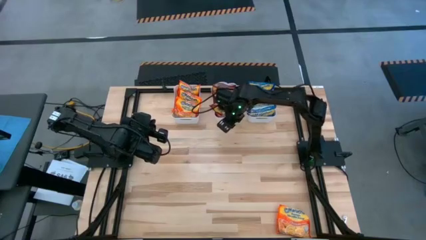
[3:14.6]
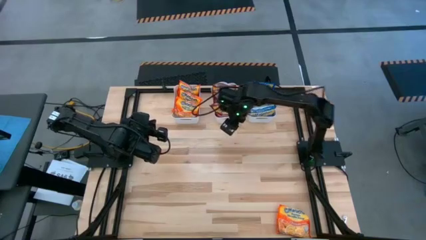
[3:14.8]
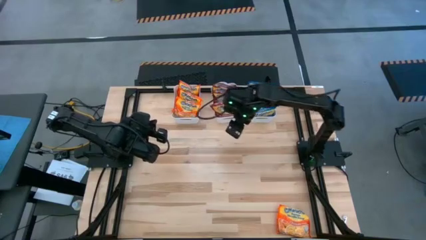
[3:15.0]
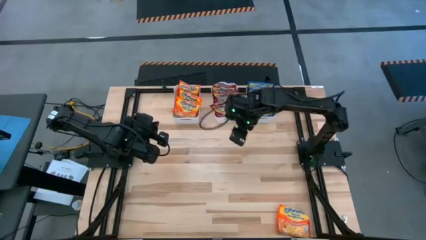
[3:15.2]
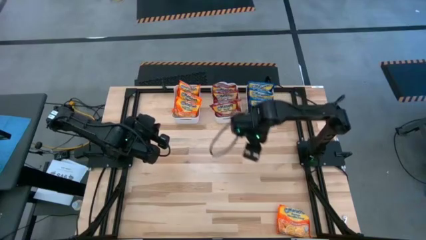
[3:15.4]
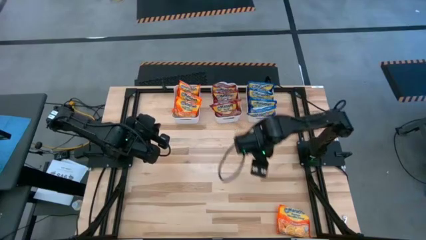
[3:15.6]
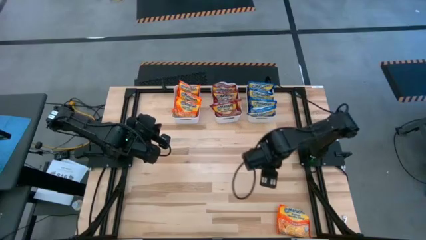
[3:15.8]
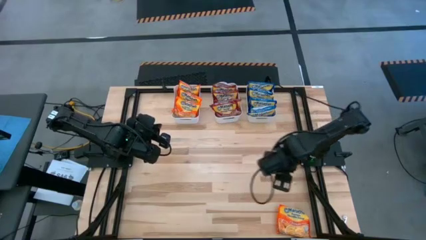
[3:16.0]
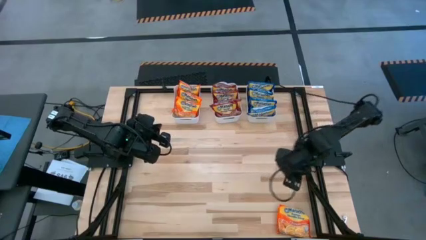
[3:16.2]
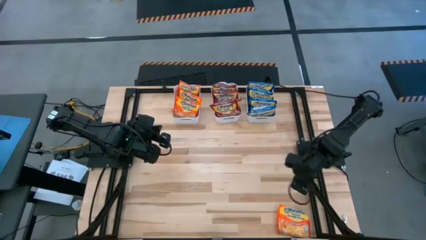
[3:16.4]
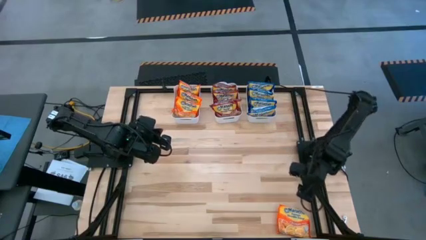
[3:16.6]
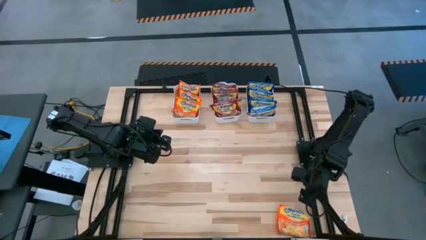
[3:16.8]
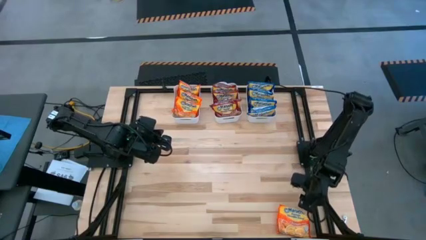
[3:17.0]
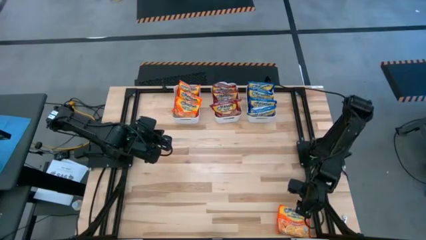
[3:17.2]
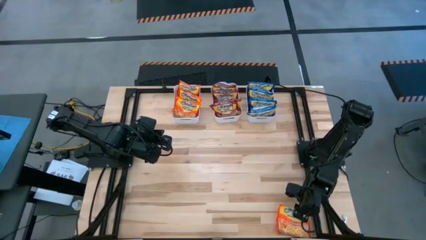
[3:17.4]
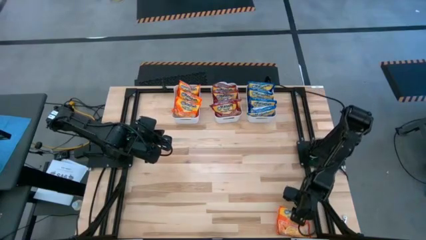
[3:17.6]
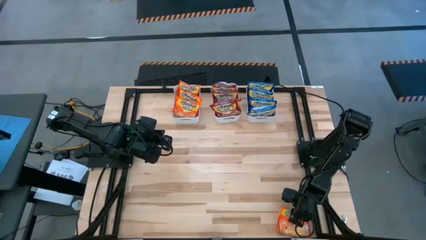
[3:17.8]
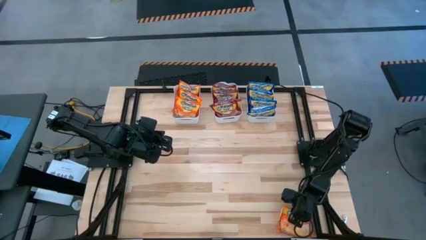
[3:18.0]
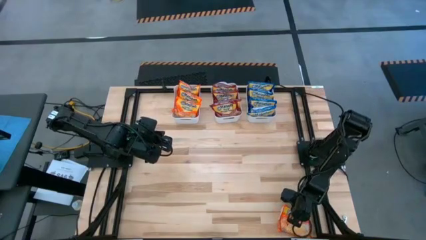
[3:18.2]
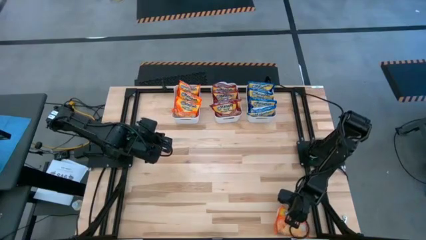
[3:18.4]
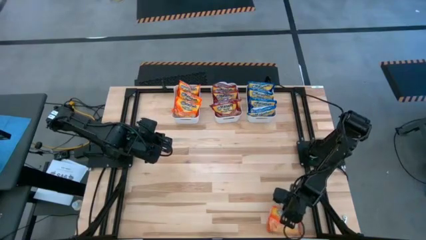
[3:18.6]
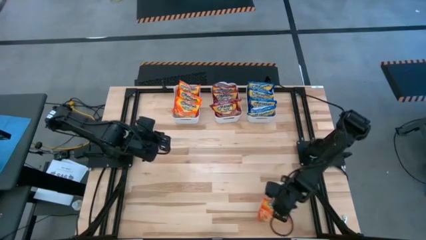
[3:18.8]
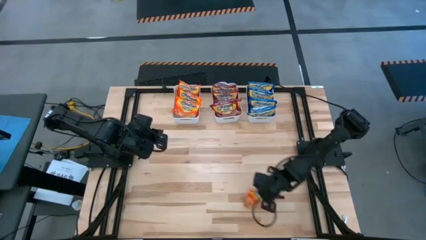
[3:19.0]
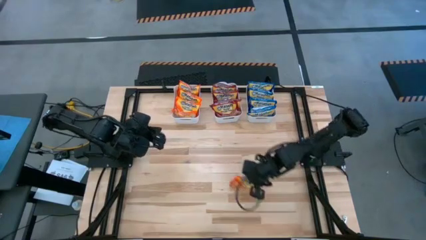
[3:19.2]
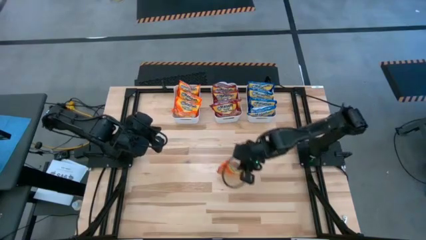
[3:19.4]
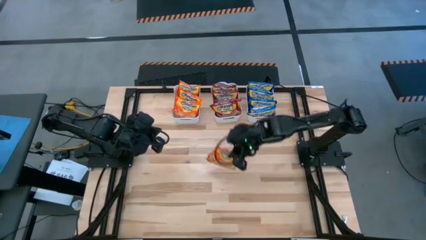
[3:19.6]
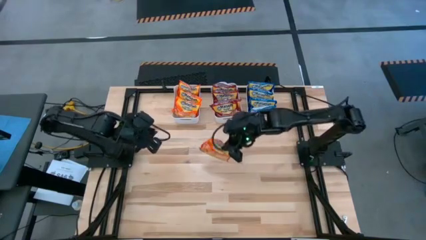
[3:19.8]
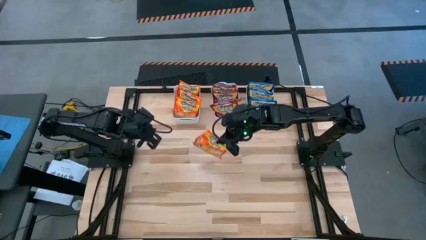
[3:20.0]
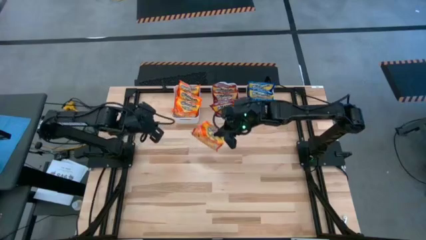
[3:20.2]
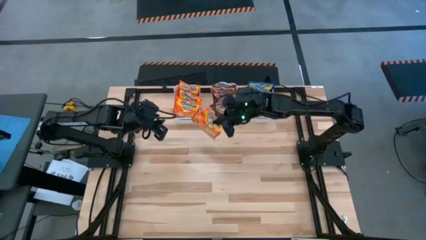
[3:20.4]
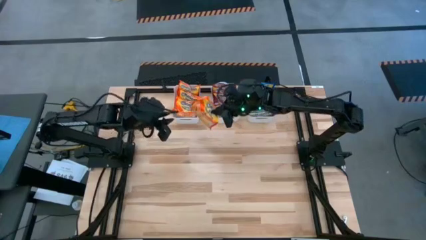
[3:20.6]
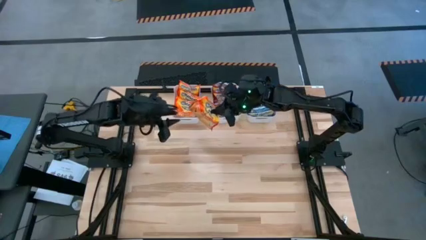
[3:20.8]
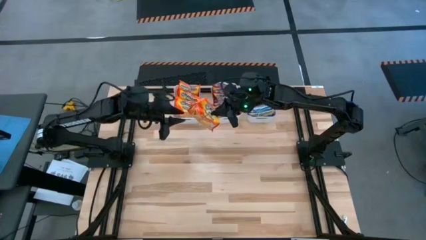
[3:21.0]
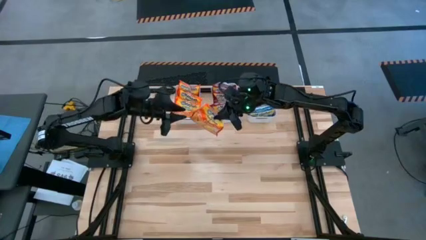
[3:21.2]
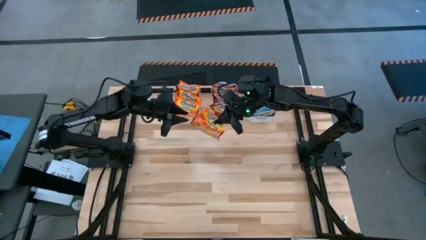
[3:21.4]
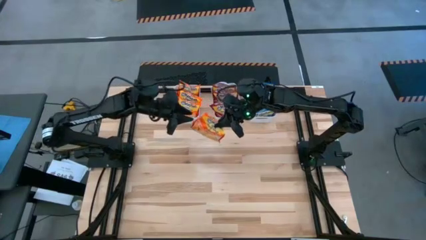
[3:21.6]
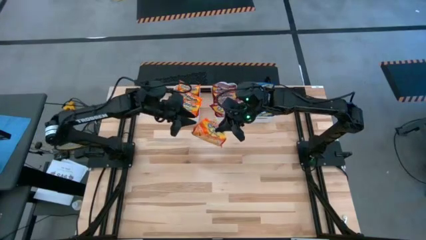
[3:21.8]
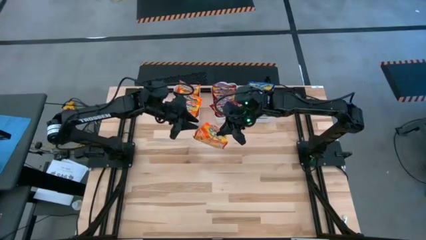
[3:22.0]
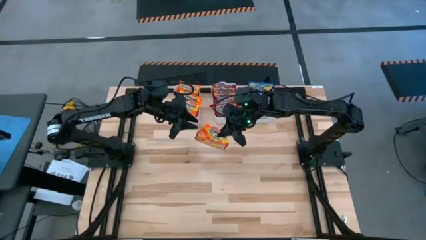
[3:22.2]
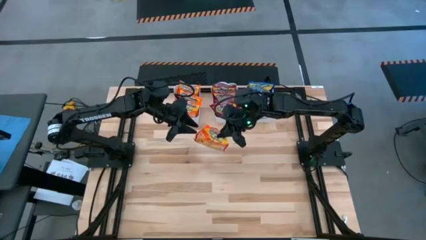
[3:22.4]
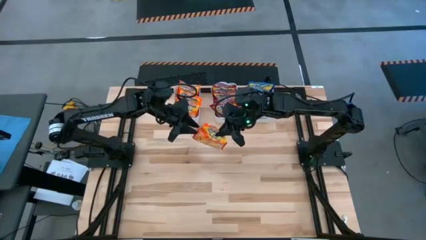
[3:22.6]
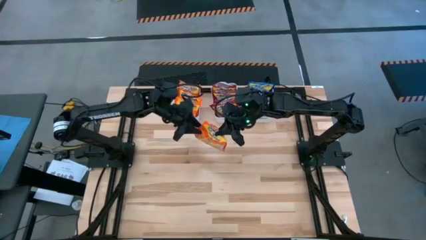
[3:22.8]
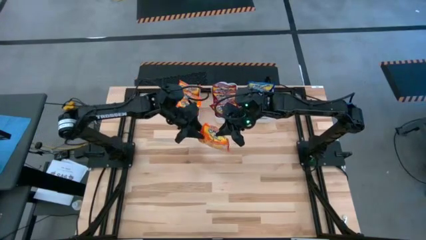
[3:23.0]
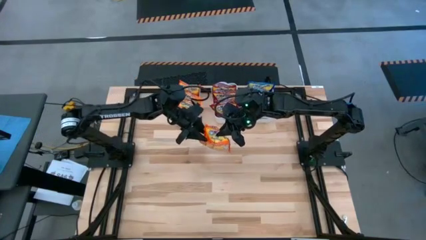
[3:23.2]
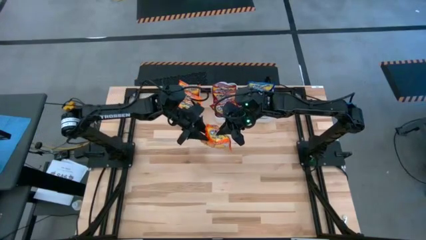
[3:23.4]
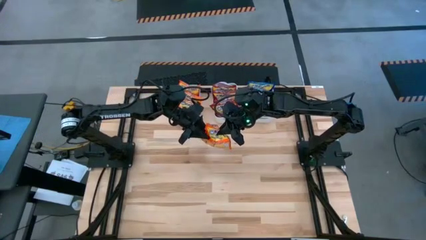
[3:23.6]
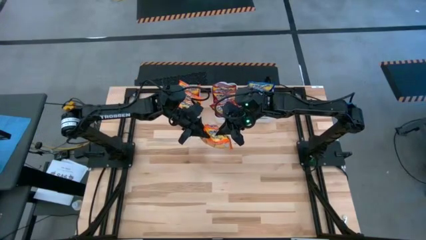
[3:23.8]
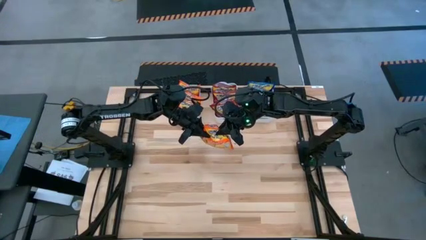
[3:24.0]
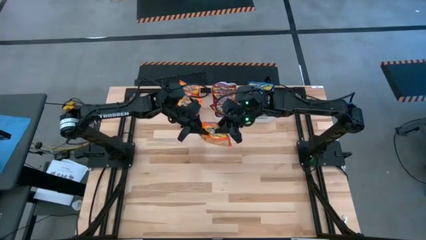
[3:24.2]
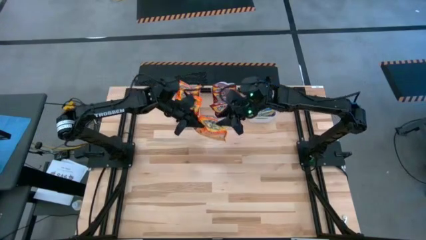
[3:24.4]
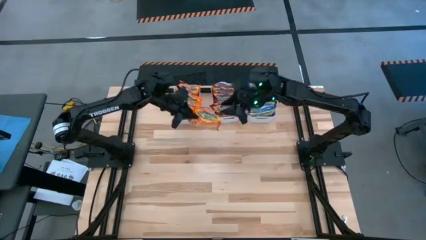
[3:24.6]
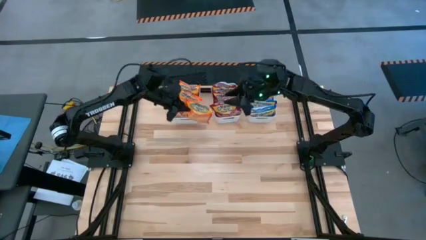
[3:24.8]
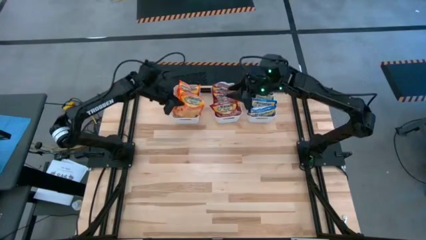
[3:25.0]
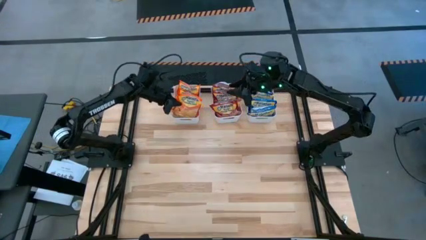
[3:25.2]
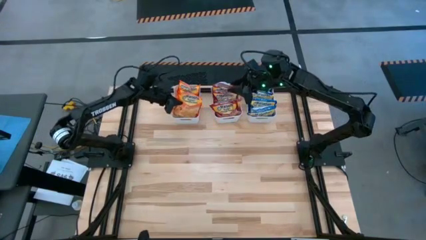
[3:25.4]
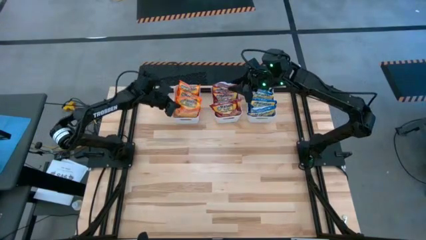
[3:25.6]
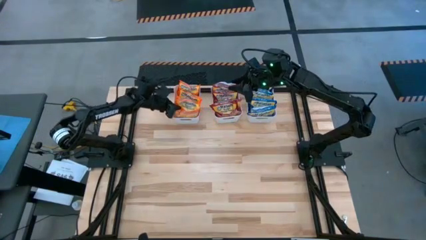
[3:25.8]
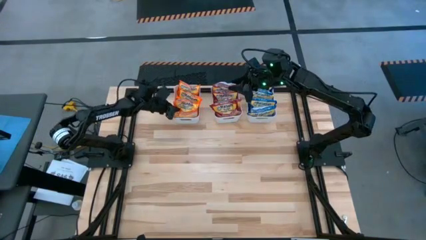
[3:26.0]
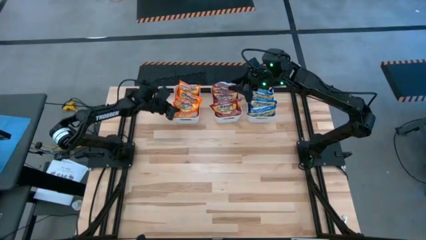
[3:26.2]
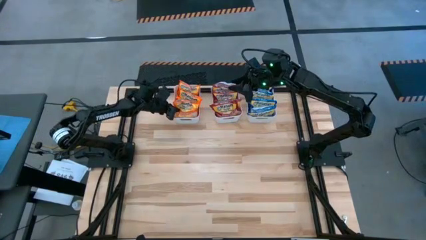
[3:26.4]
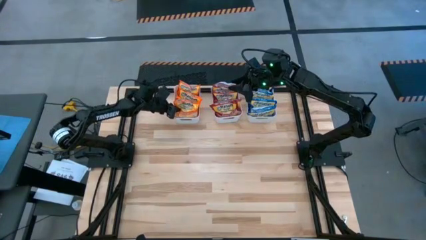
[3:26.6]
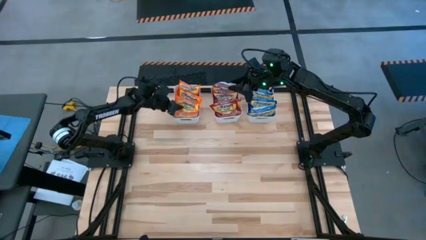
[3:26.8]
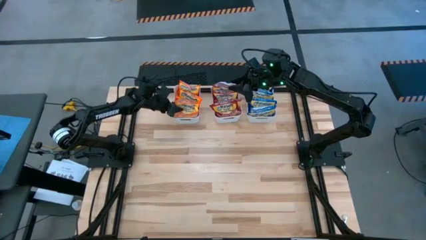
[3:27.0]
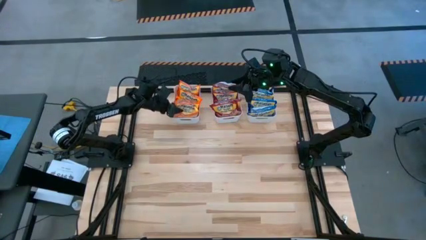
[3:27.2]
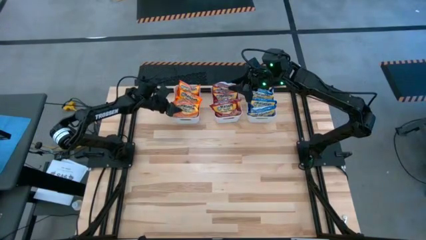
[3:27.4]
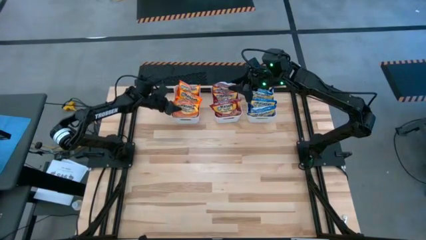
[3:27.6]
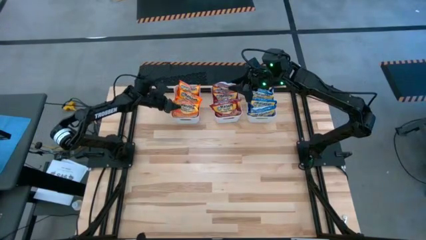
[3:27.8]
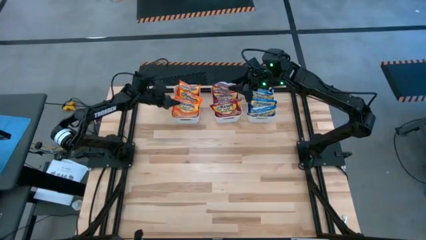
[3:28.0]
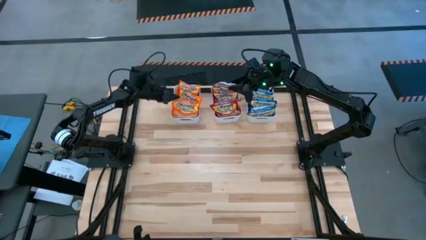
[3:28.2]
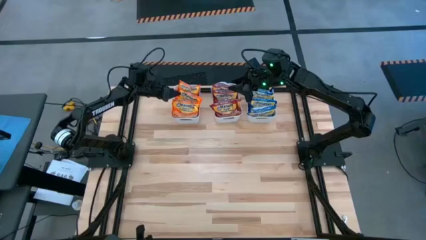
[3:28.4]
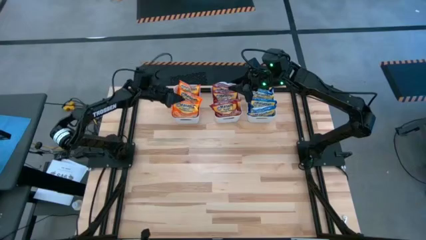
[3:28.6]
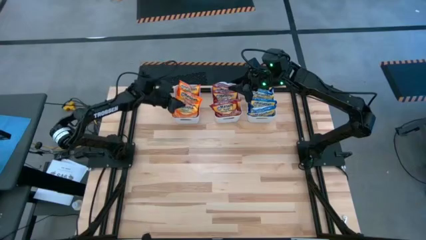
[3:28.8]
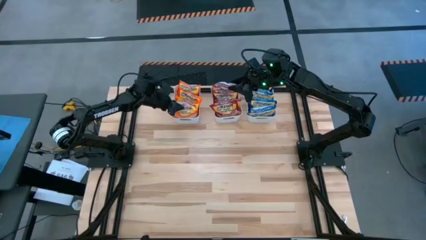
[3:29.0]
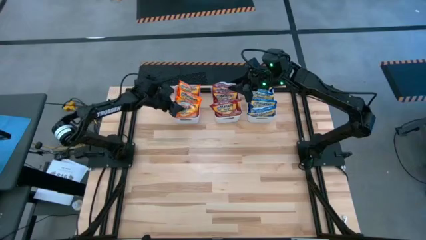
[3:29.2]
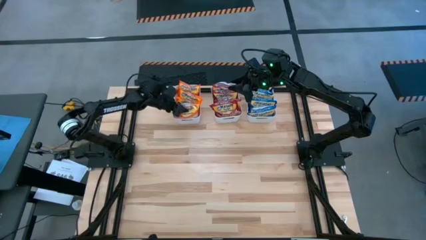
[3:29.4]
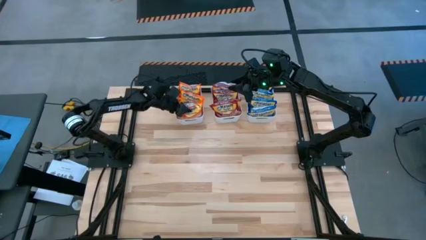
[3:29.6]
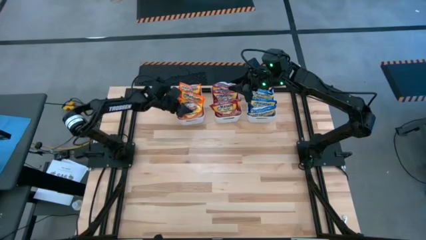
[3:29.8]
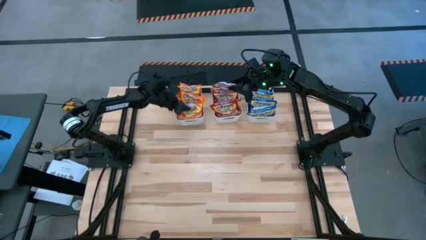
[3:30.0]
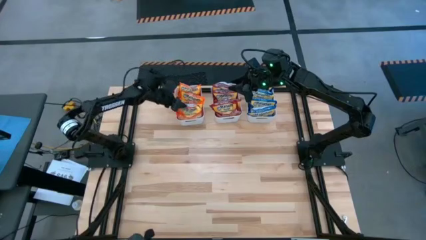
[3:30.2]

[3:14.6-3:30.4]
Task: Sort Maruchan noodles
Put the orange noodle pack into the left white bin

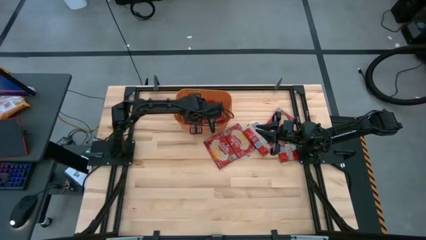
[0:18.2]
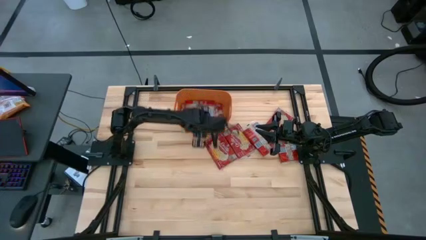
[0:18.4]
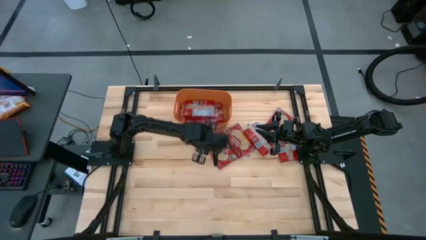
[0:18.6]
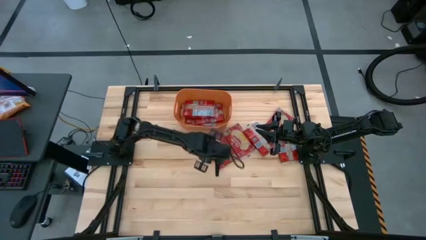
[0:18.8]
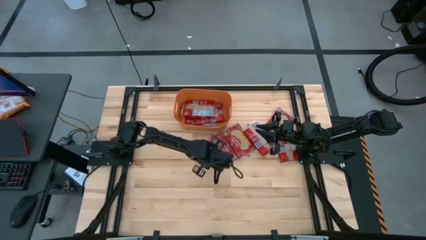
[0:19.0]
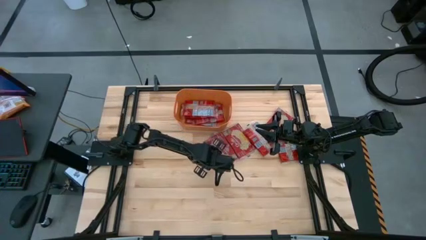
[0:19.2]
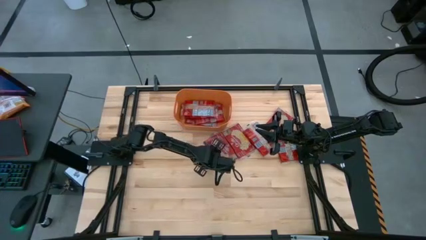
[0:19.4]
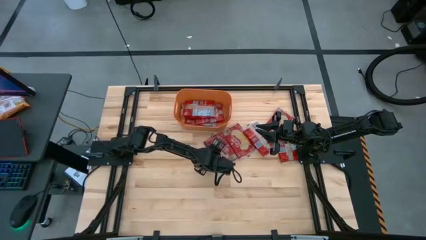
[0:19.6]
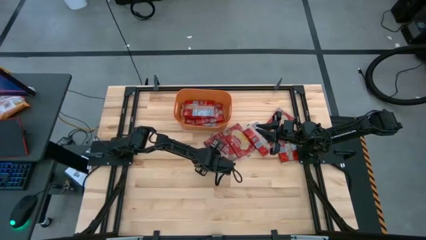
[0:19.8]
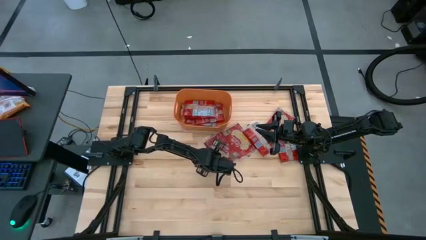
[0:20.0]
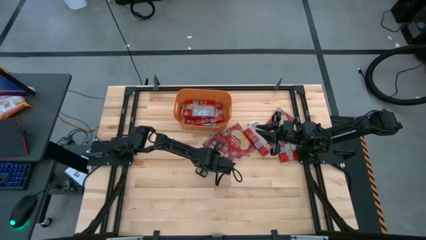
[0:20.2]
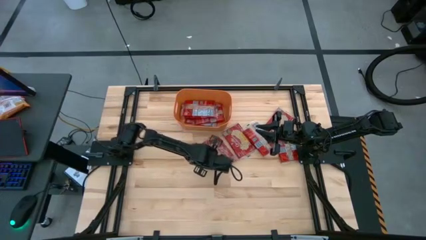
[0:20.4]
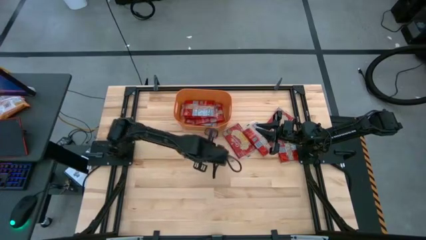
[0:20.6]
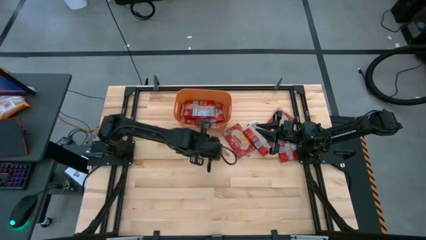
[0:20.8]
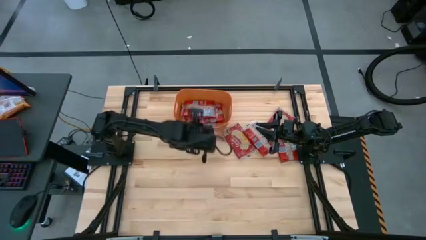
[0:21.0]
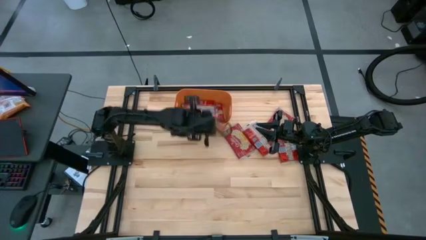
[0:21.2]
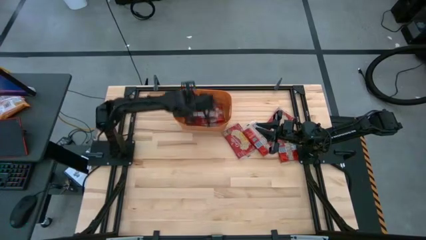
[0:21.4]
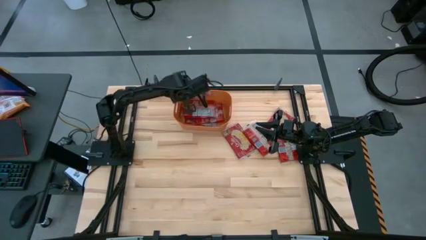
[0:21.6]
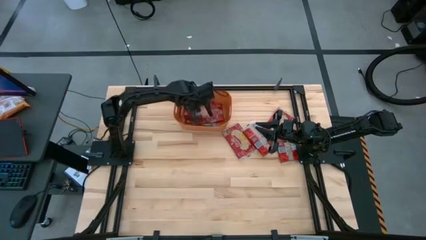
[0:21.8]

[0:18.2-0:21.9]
Task: Sort popcorn bags into baskets
Put the red popcorn bag into the orange bin
